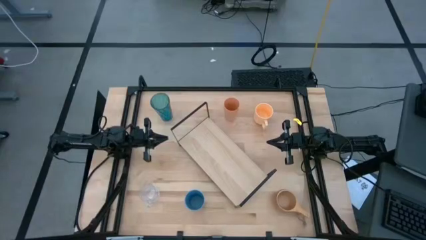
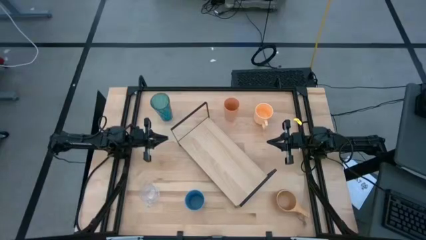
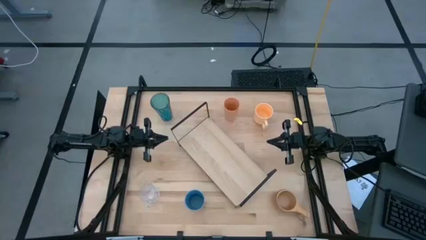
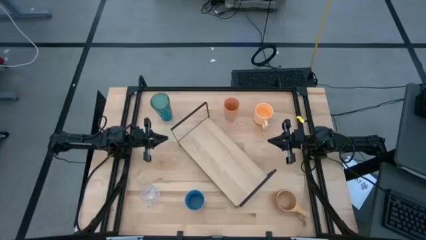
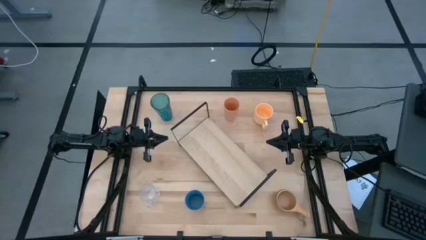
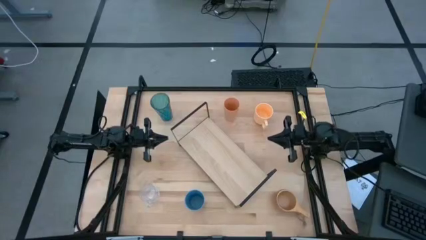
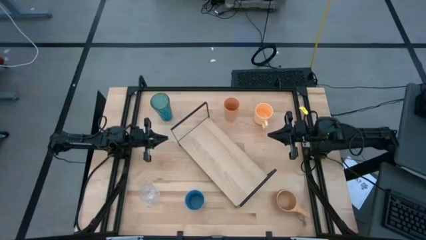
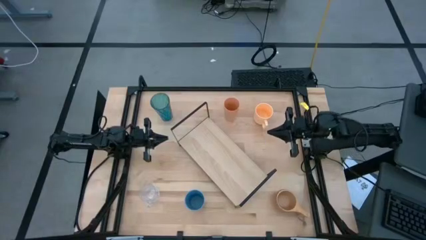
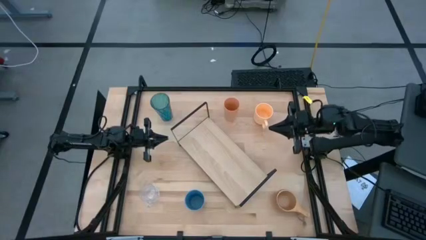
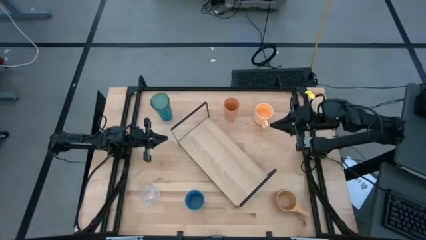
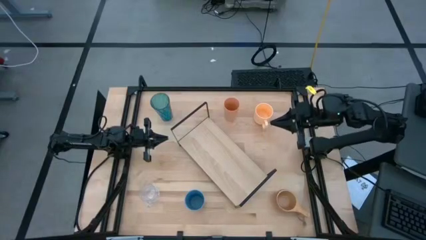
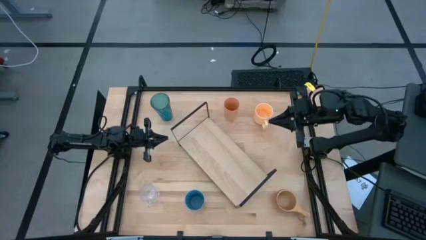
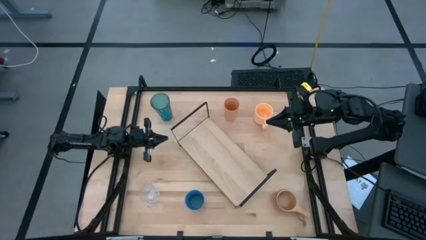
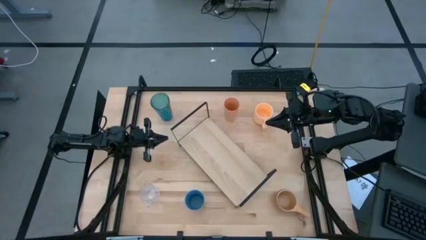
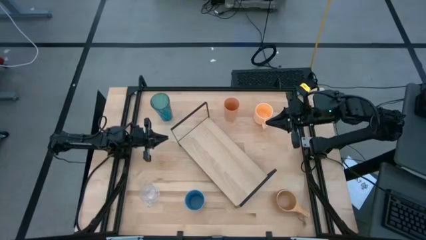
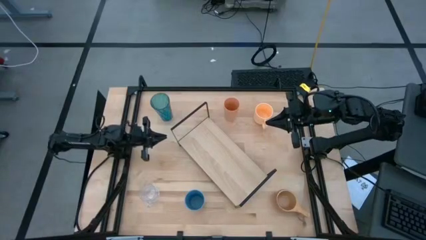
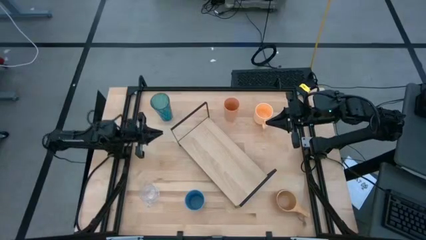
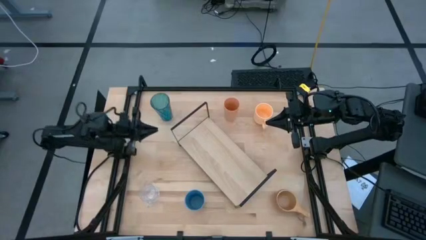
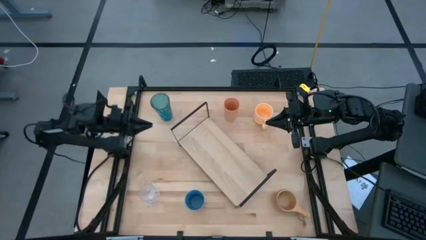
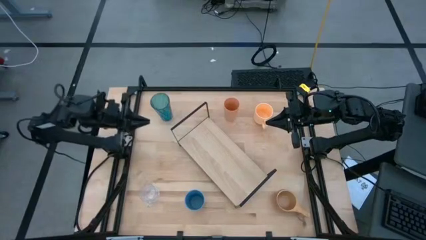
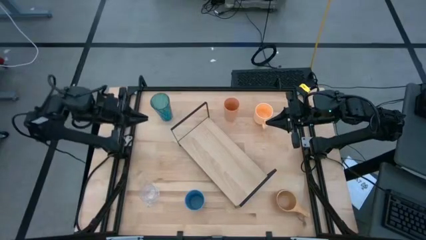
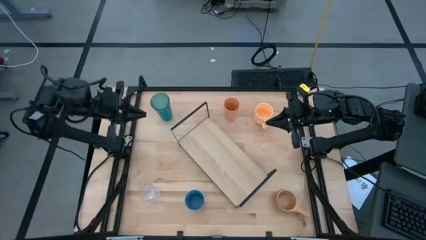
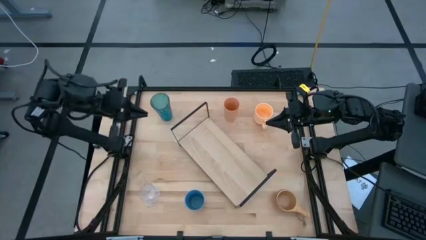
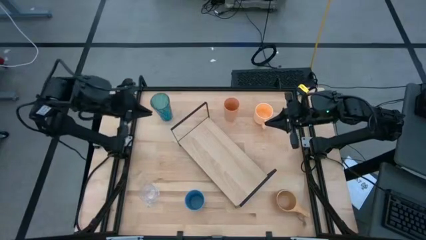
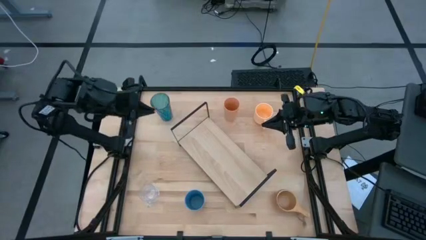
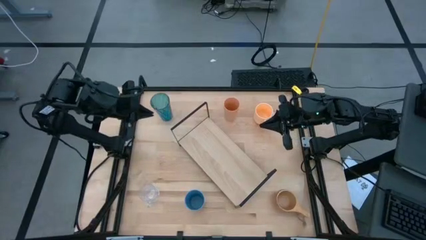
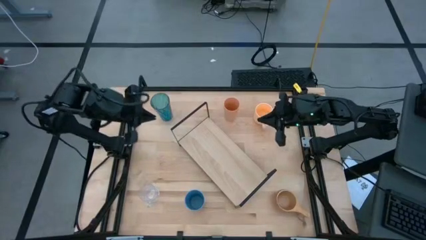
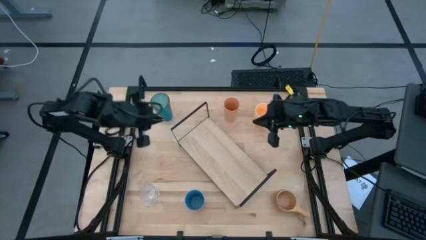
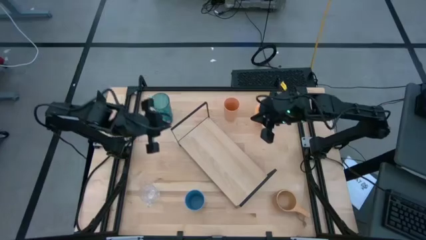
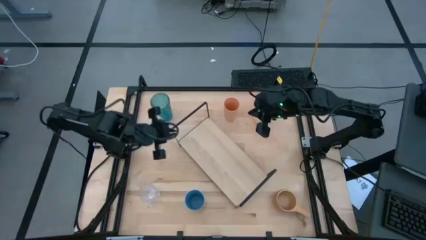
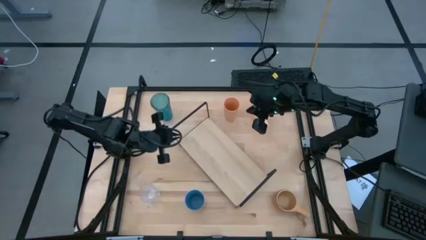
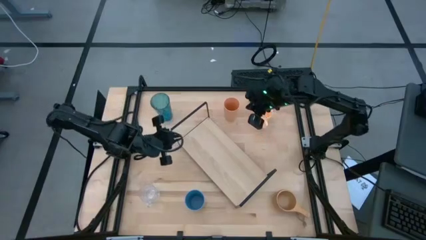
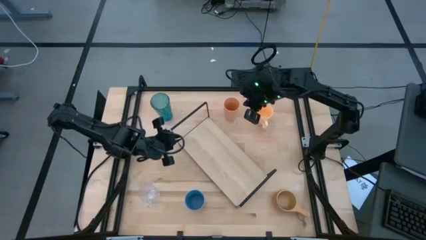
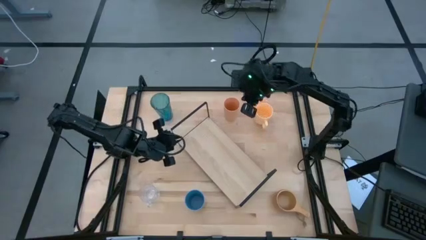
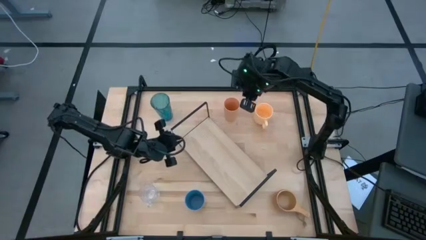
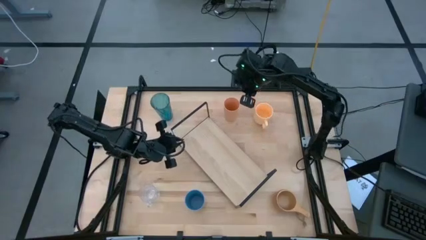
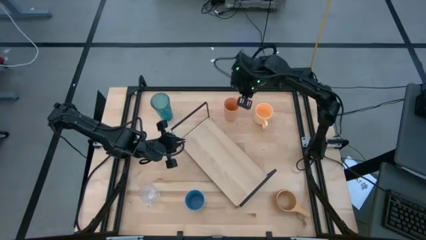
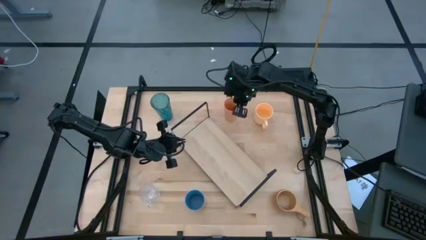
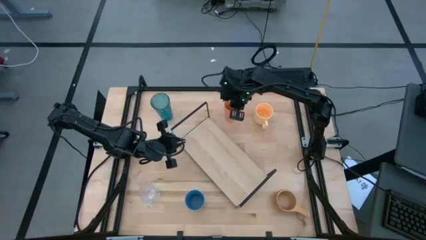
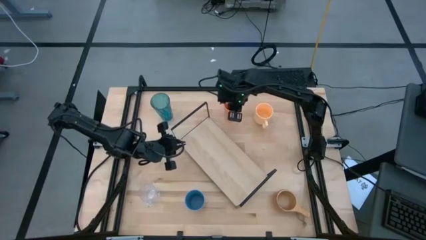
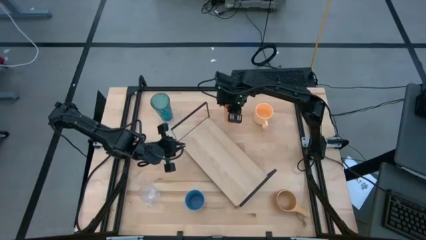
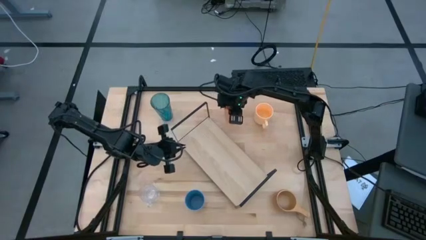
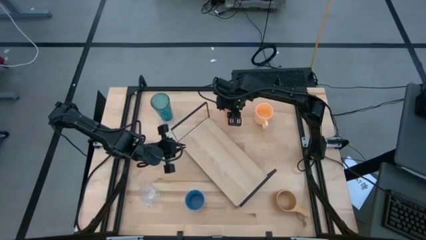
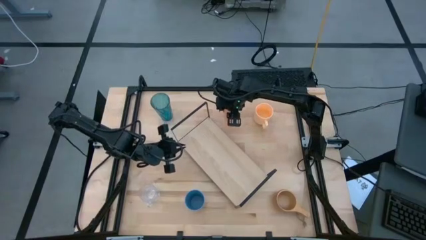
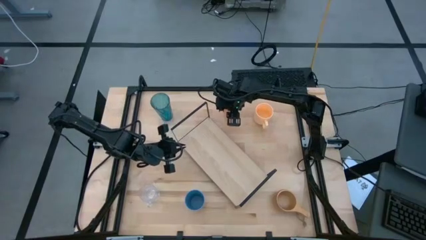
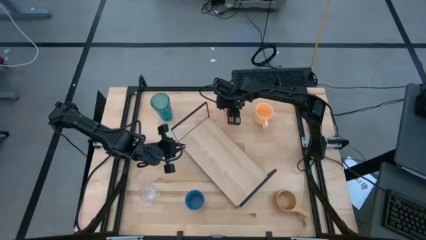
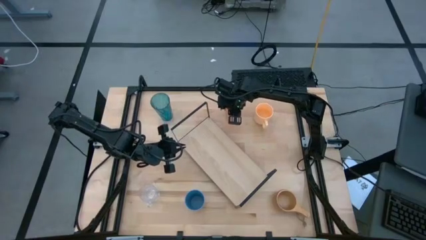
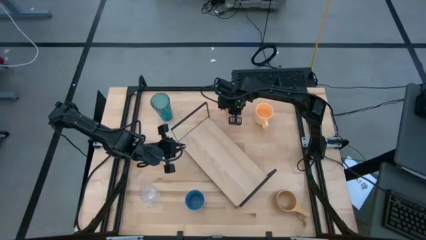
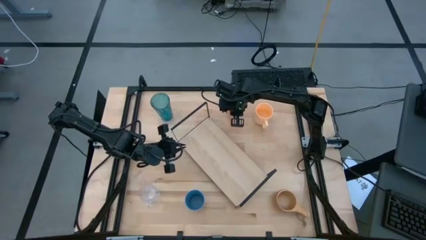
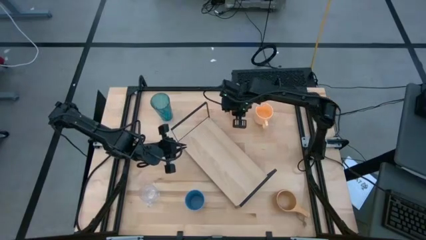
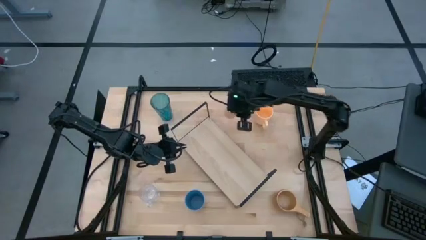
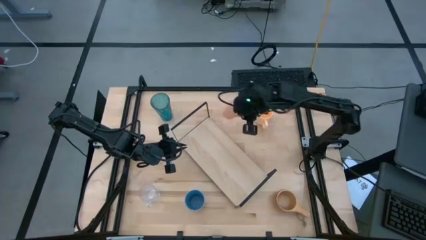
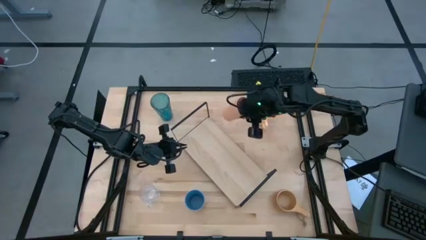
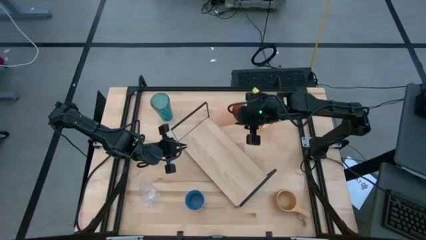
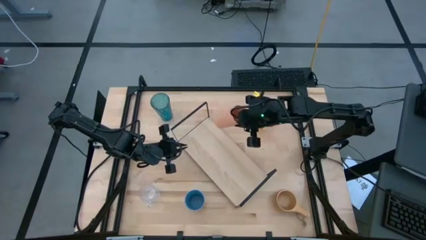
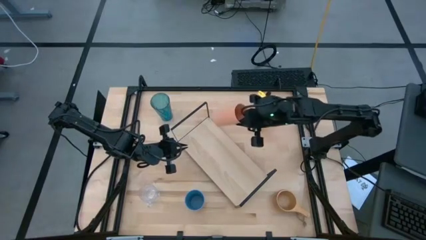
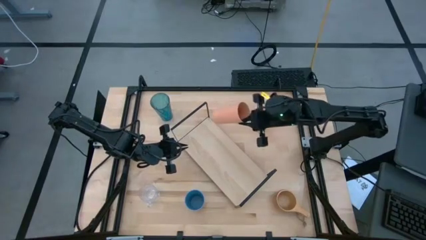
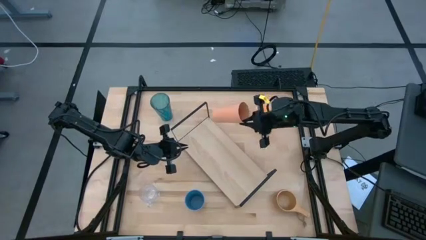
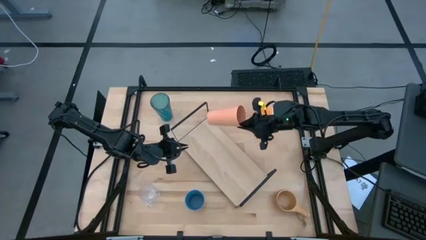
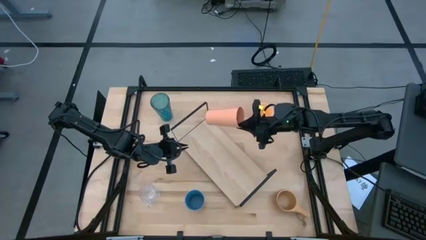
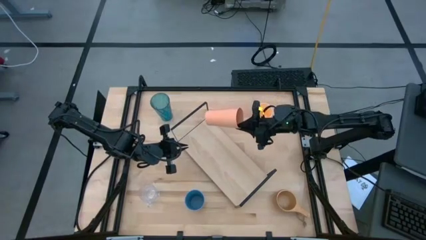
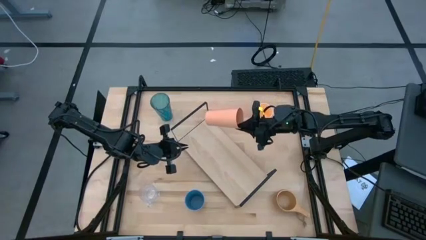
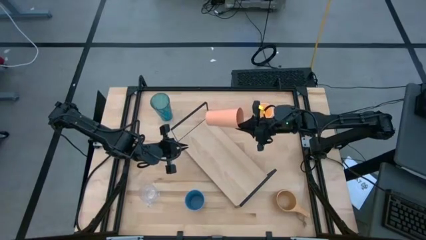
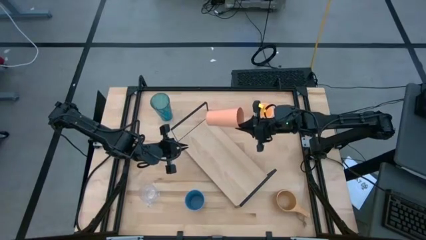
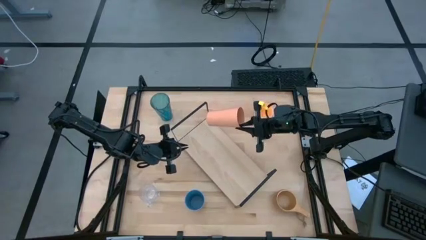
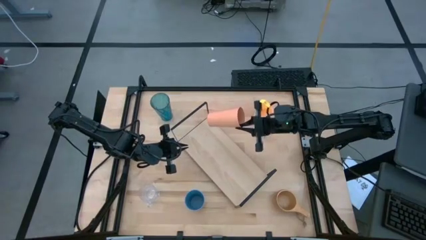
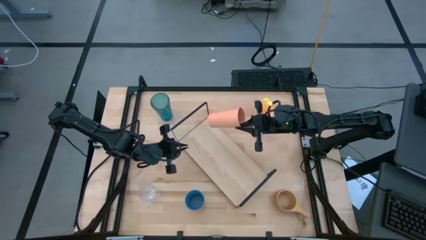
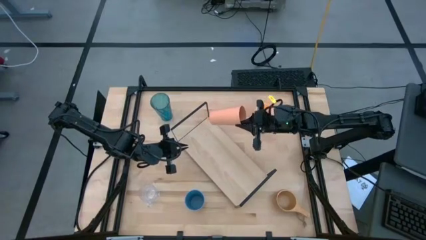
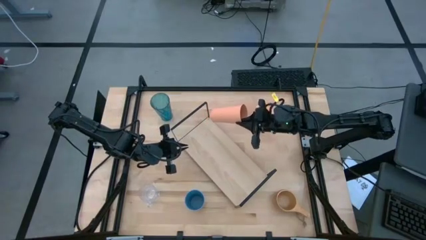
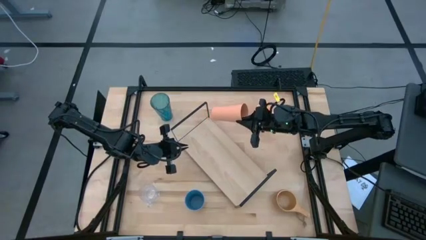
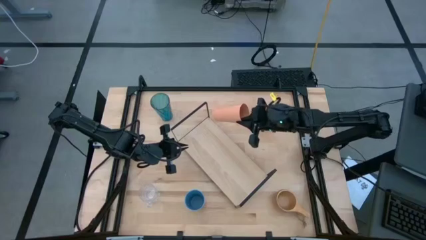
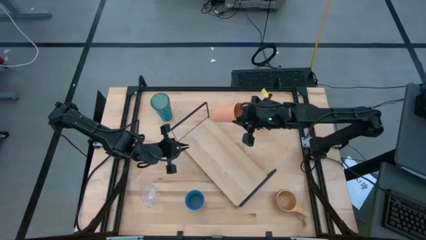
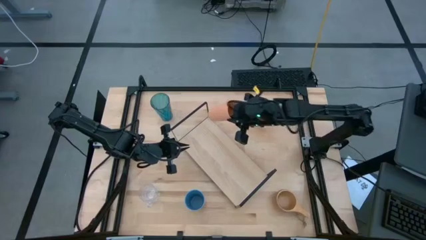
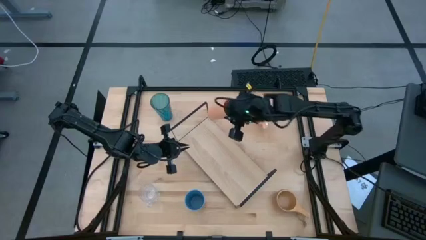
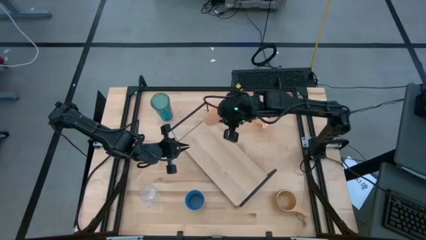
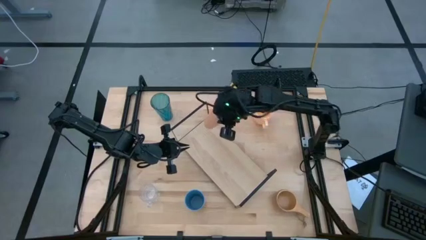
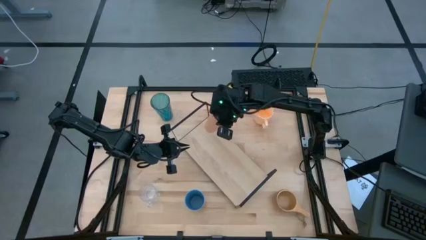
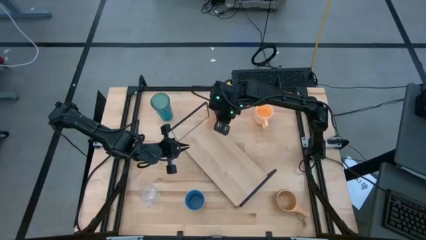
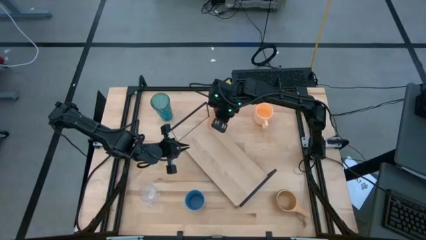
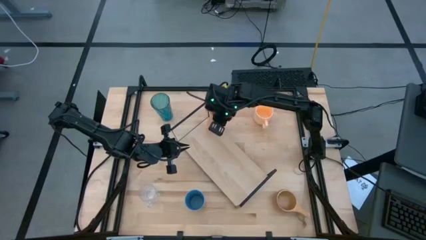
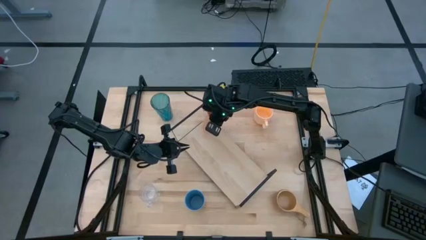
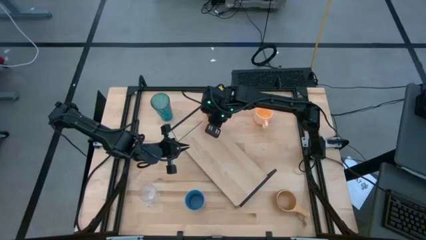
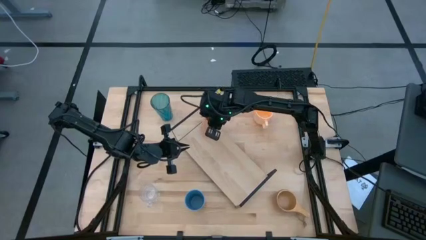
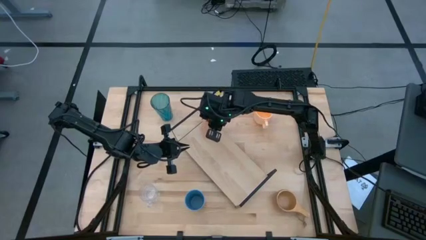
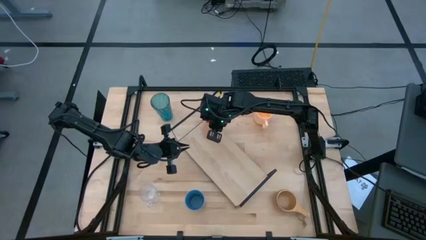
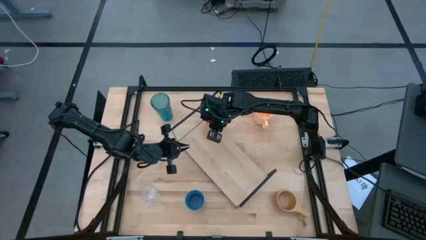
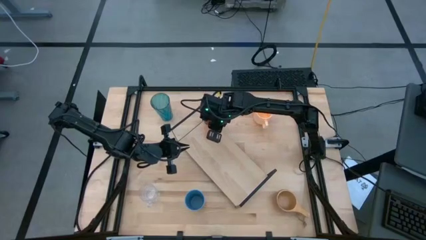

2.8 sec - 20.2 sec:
Task: Stack small to large cups/mugs on shelf
Put the orange cup on the shelf
